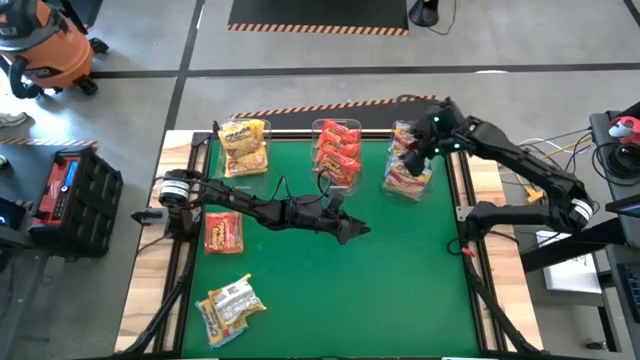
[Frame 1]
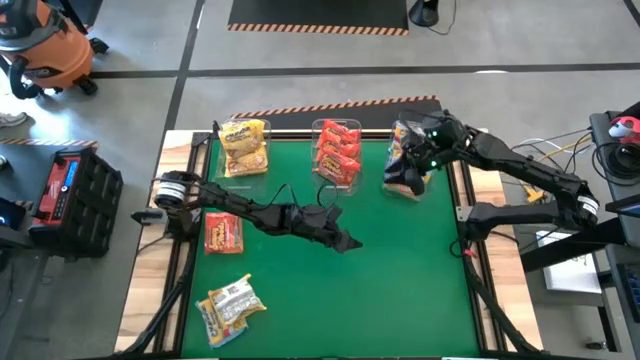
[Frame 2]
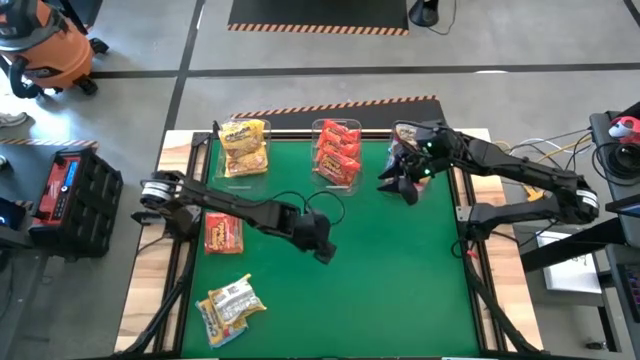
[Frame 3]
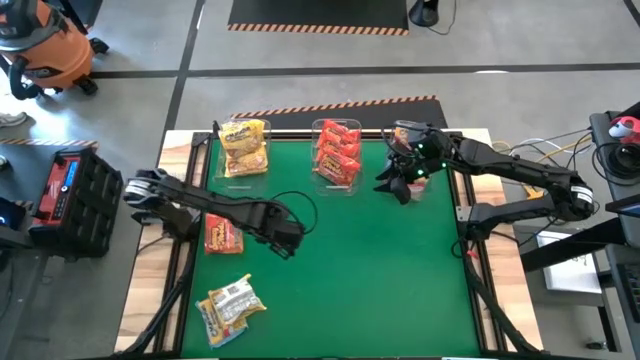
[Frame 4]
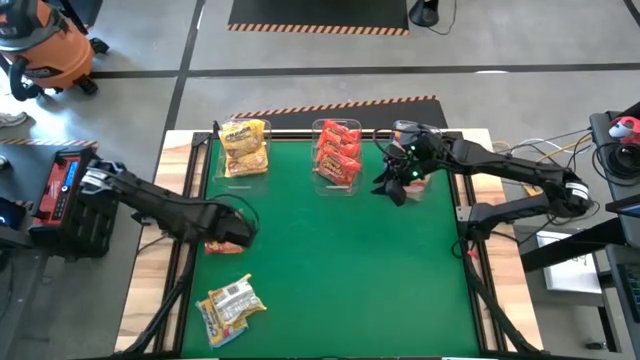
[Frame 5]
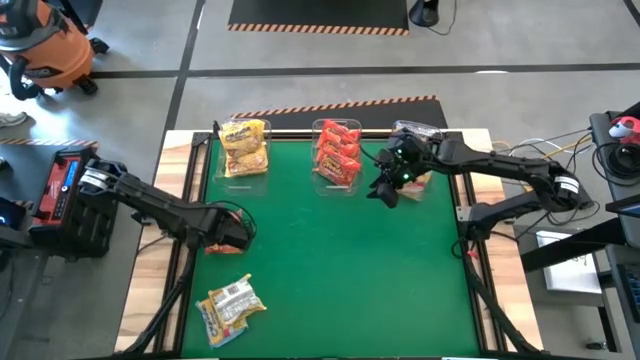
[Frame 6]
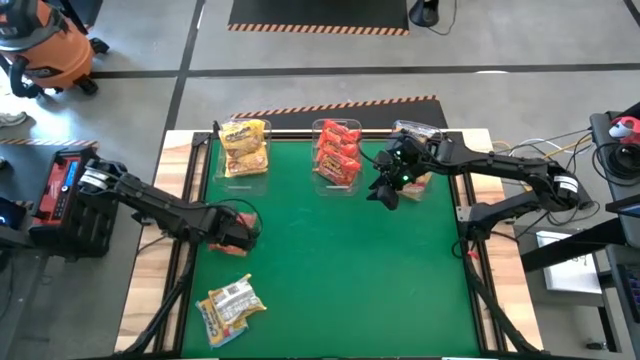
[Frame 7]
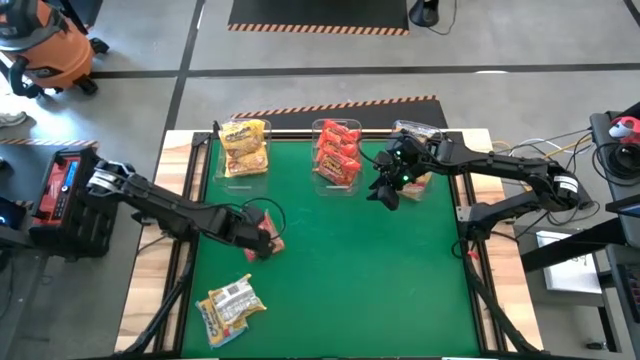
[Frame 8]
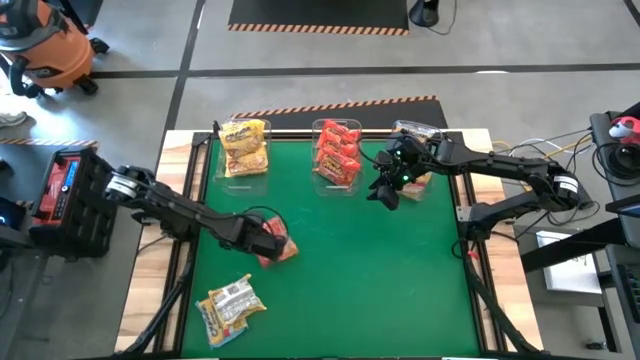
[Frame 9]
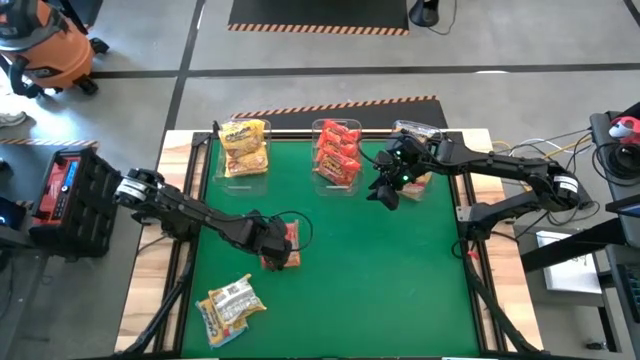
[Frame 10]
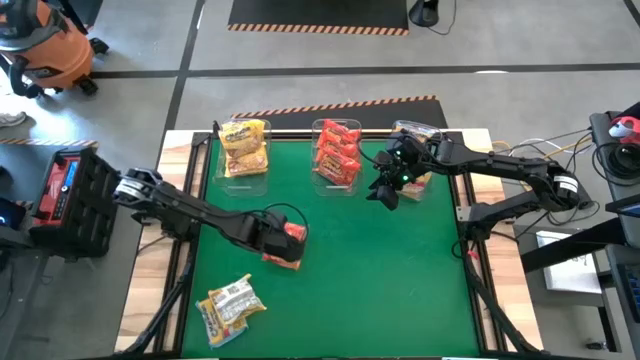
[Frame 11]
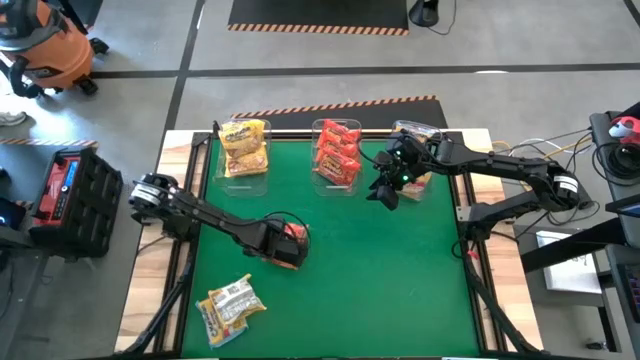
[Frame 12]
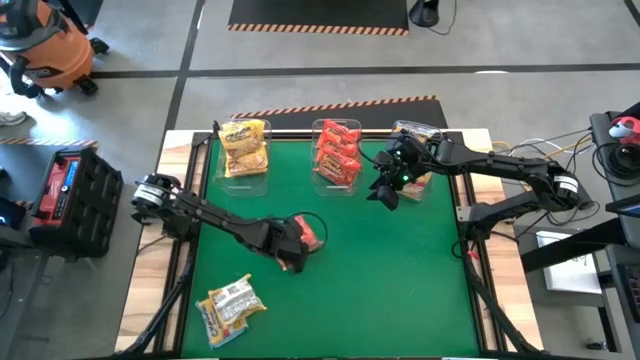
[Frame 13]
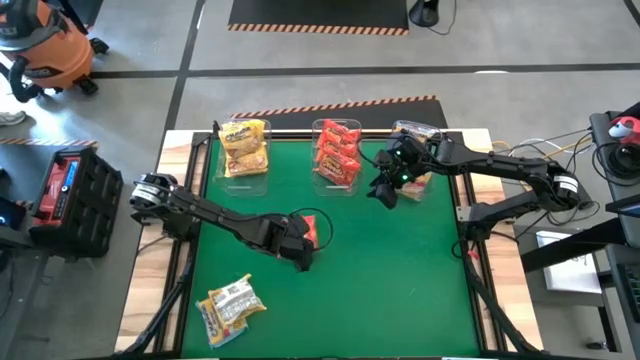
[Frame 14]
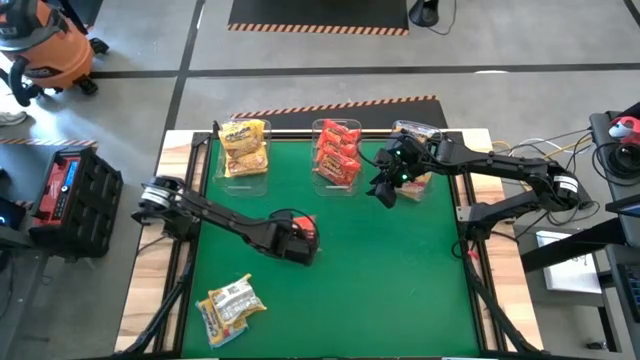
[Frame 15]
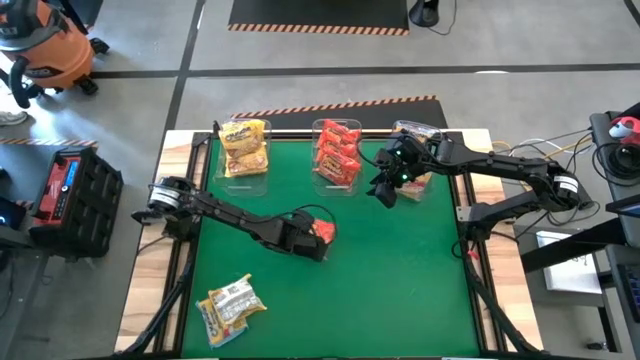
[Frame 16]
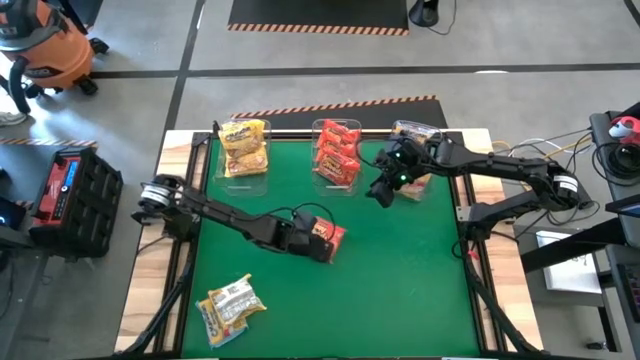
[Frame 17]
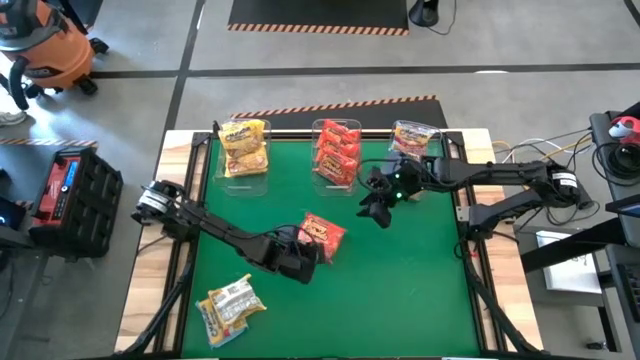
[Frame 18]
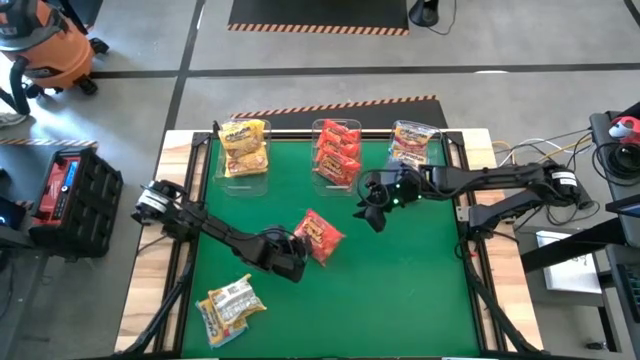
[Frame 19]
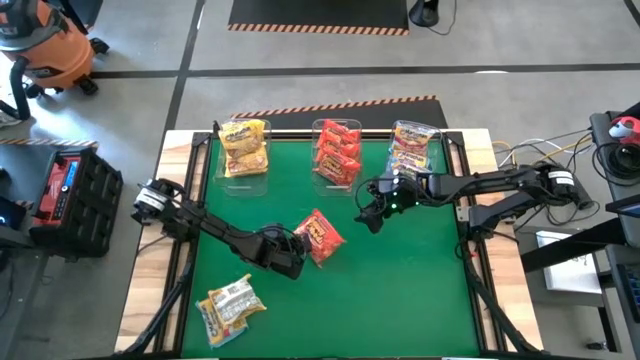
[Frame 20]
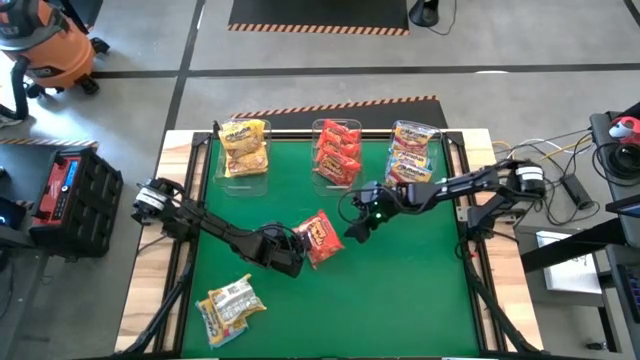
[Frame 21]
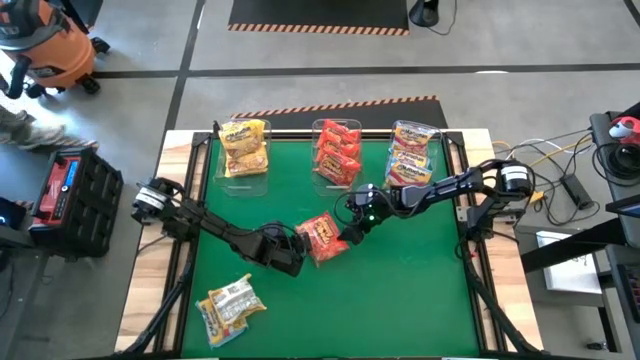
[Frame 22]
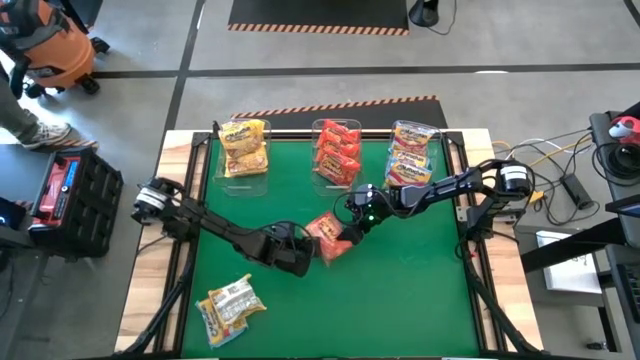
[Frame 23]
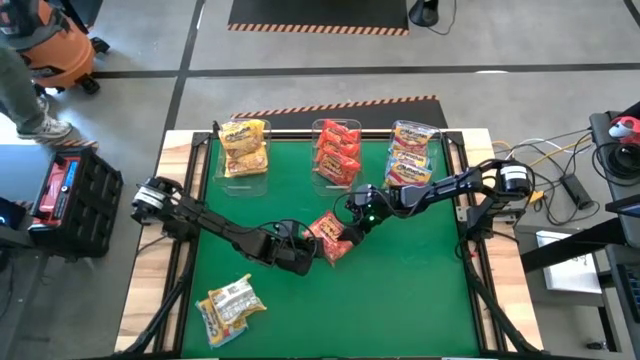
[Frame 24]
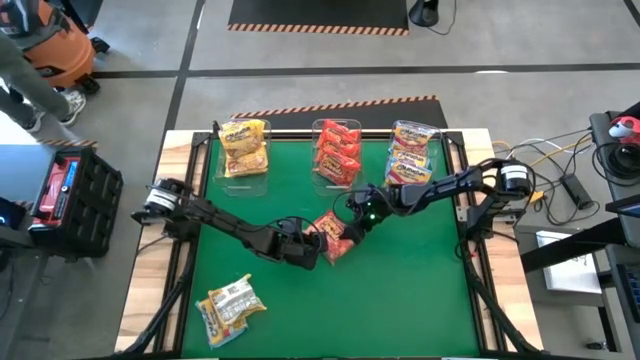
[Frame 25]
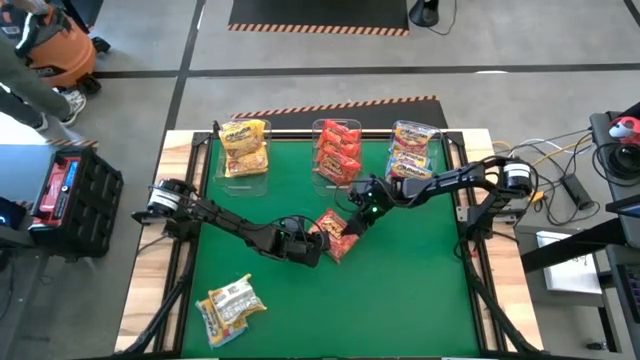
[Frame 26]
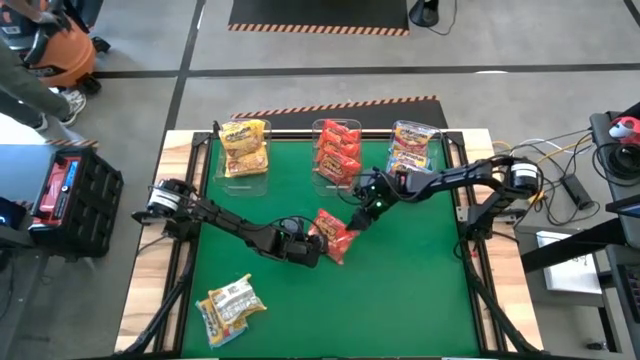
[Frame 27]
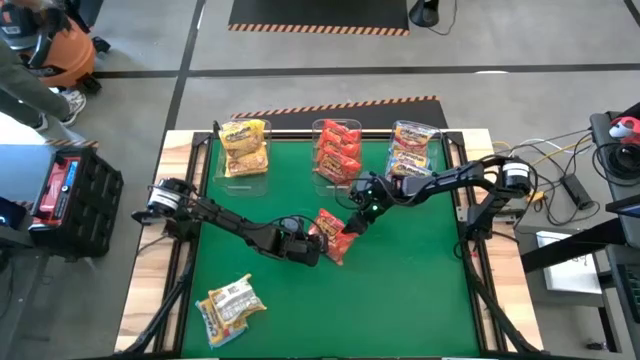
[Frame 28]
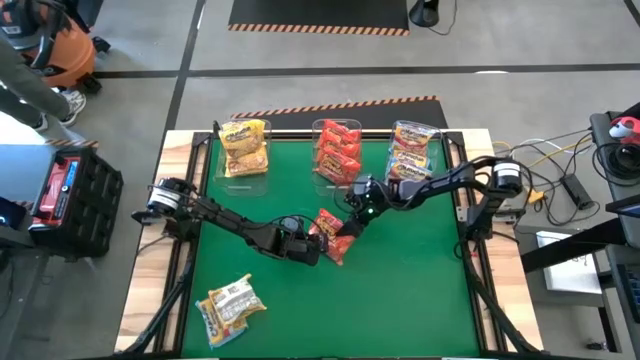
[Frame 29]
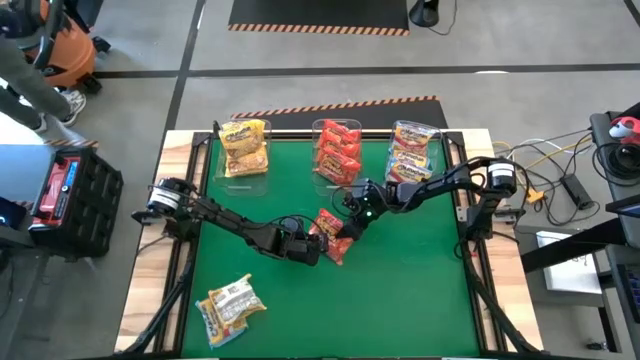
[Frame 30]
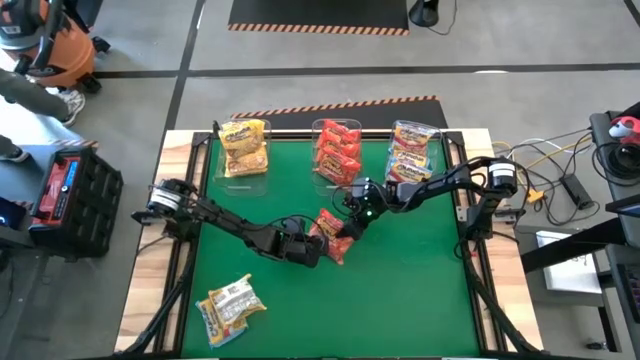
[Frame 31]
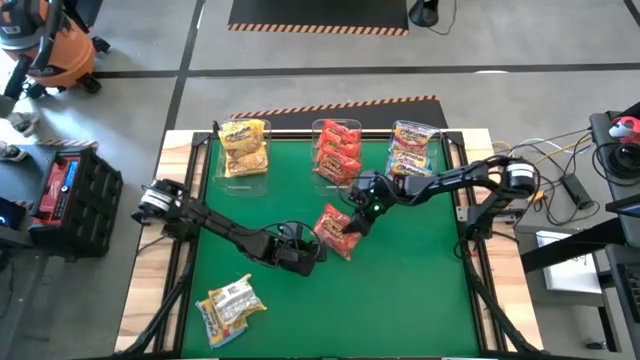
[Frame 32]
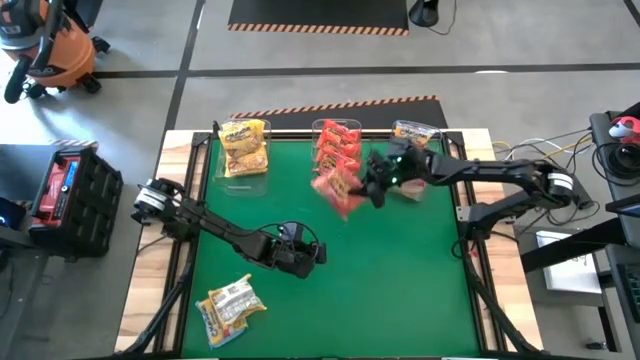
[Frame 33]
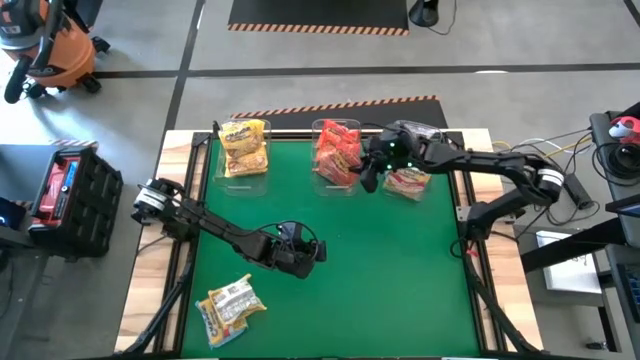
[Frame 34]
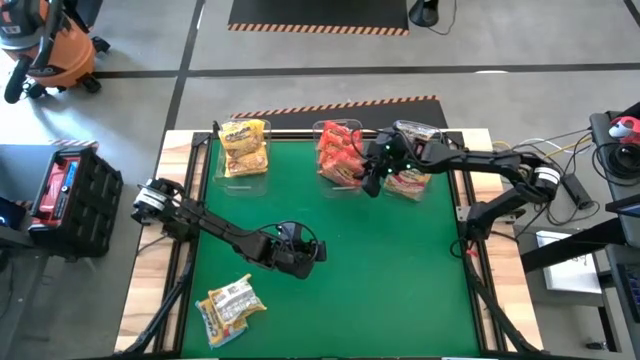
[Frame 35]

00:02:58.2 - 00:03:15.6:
Task: Sort Maruchan noodles
Put the orange noodle pack into the middle transparent bin

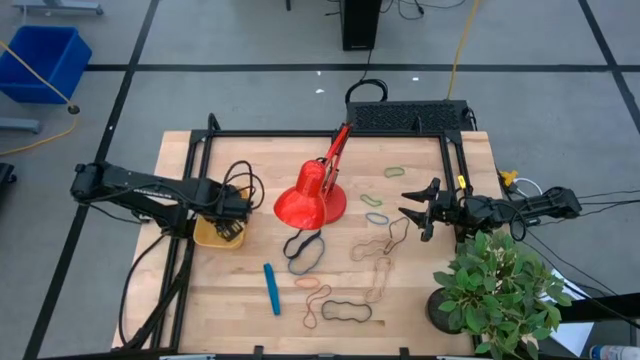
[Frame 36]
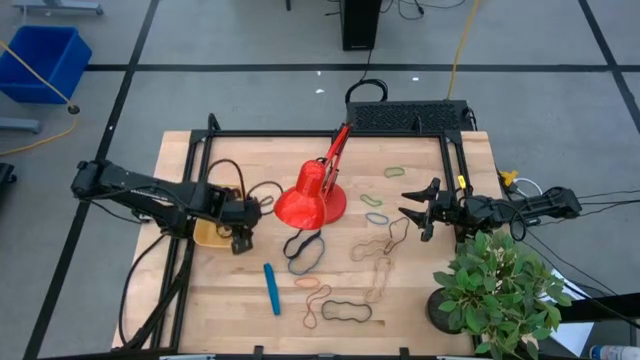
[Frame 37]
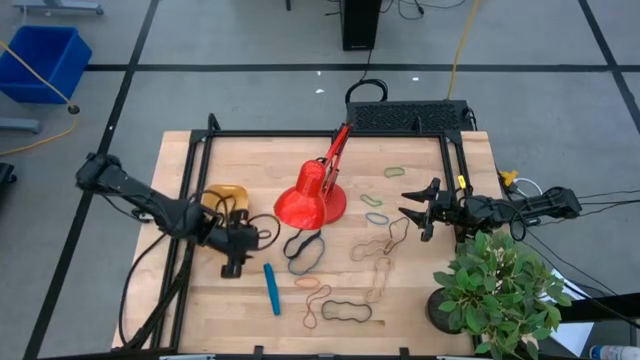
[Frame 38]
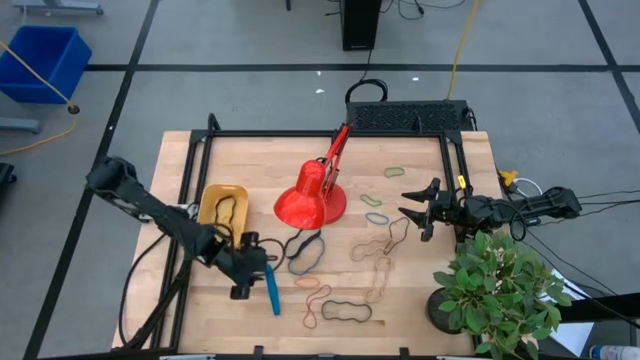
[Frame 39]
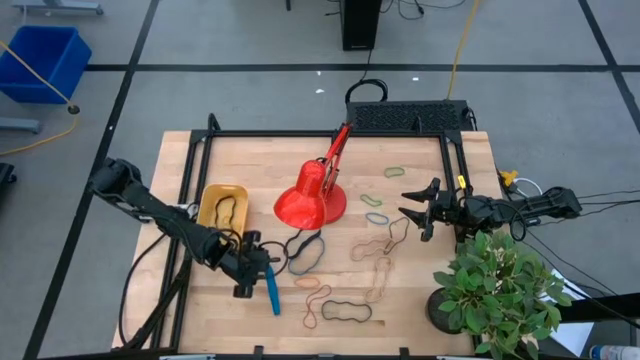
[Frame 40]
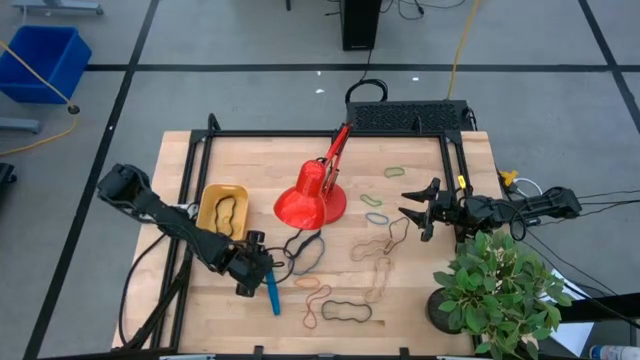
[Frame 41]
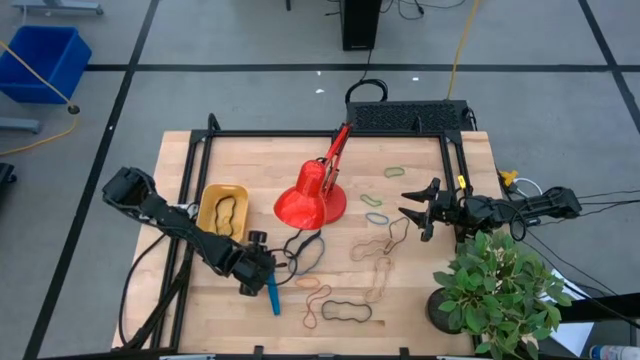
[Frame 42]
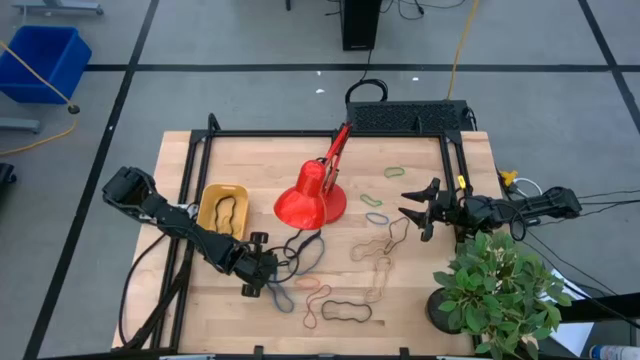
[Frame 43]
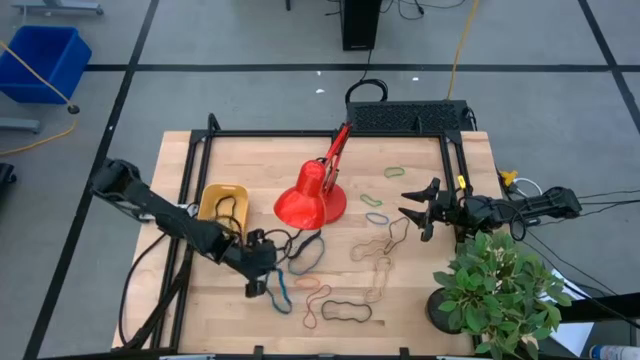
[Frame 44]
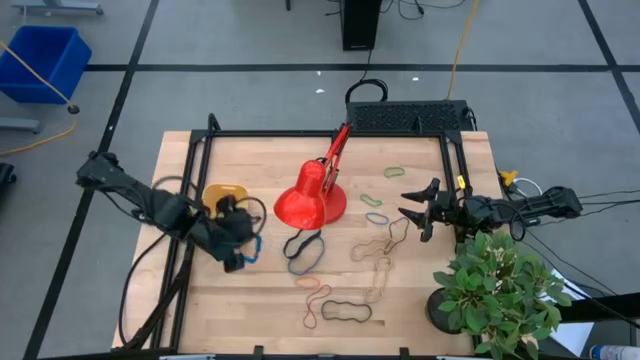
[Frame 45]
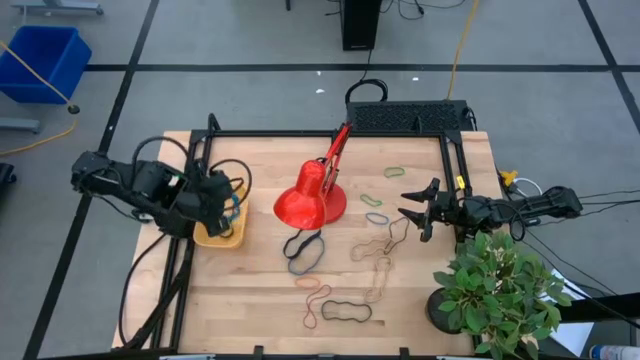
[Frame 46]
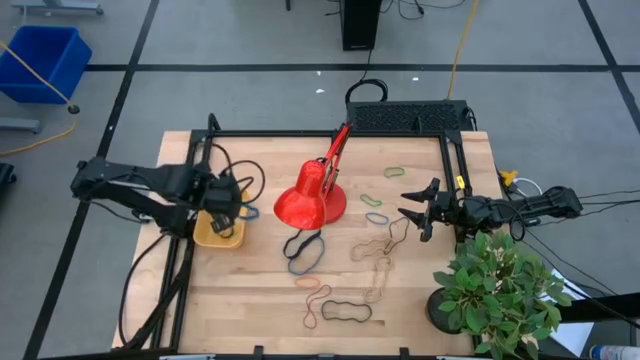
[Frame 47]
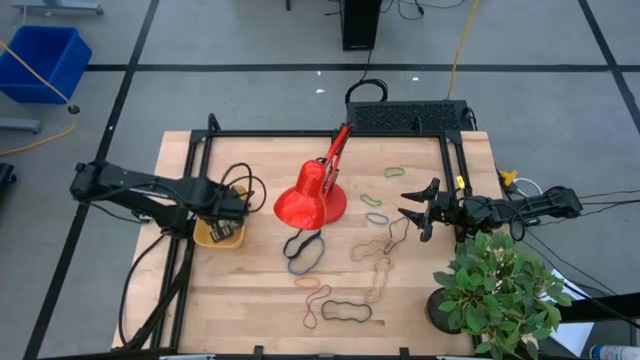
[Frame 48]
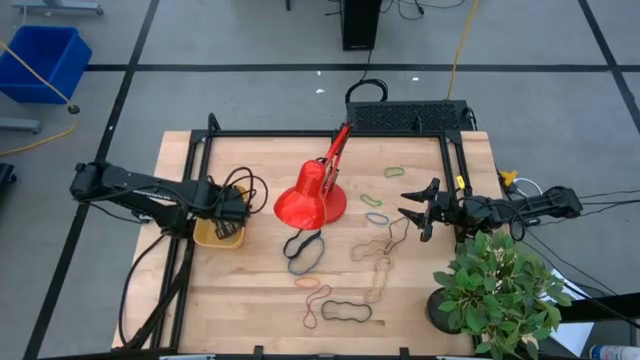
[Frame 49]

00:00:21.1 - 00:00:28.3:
Task: Pick and place rubber bands into bin
Put the bottom blue rubber band into the yellow bin
